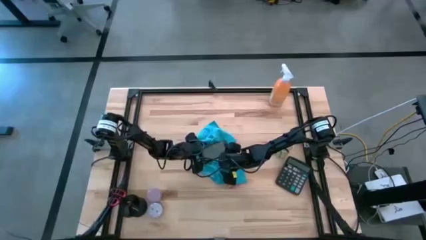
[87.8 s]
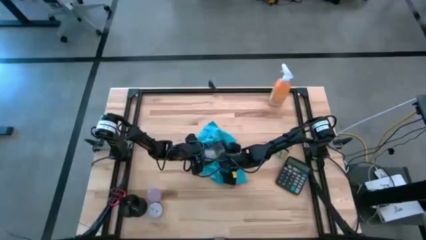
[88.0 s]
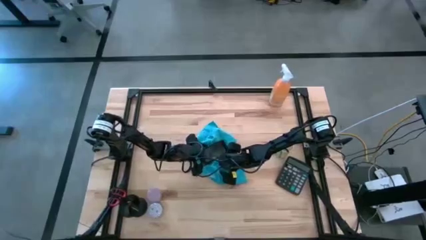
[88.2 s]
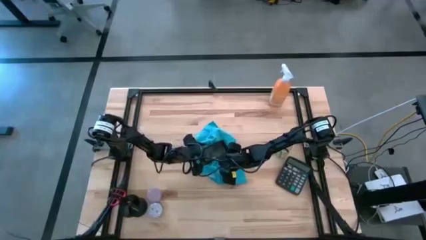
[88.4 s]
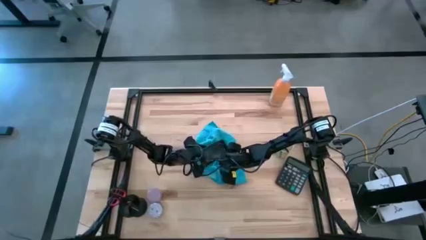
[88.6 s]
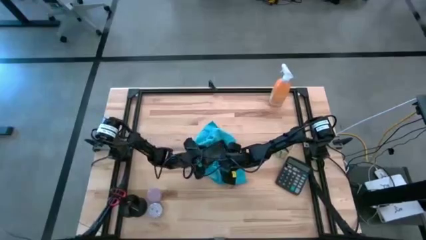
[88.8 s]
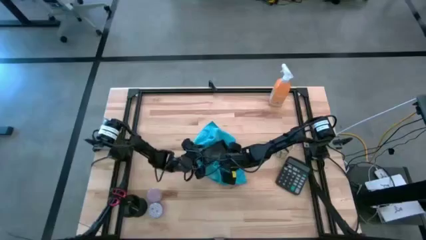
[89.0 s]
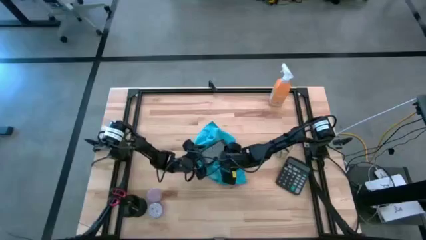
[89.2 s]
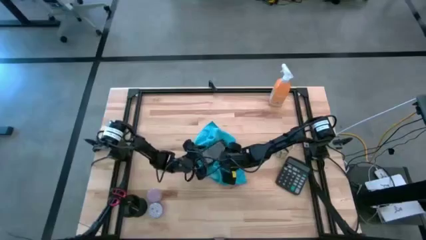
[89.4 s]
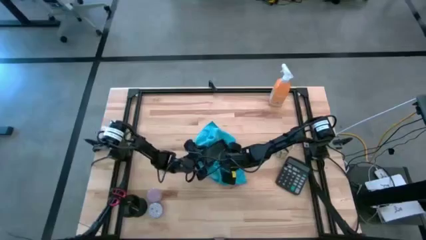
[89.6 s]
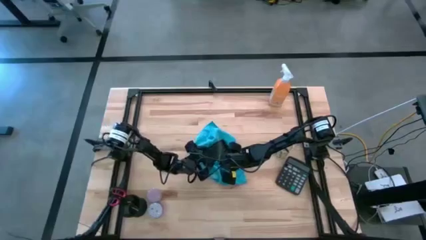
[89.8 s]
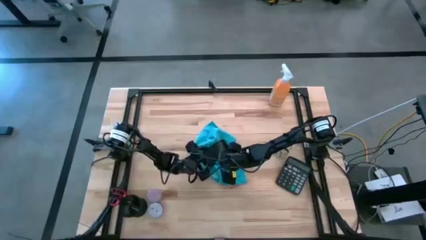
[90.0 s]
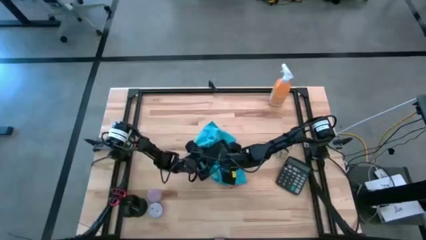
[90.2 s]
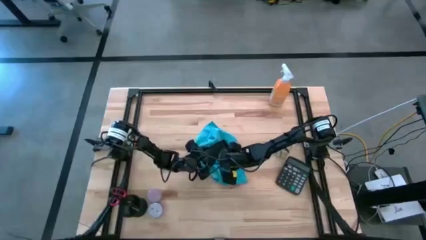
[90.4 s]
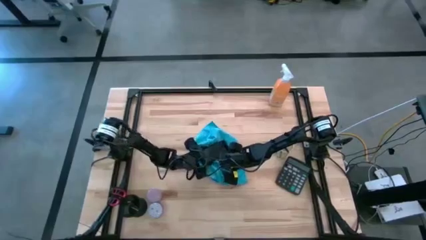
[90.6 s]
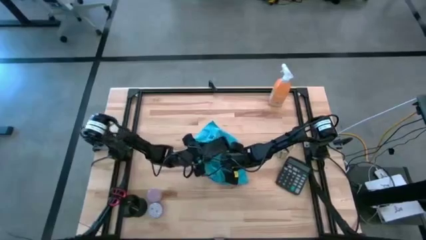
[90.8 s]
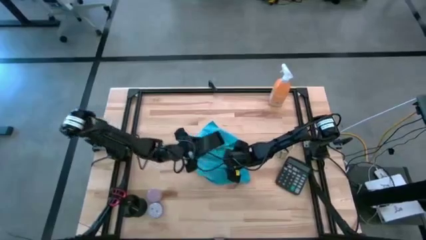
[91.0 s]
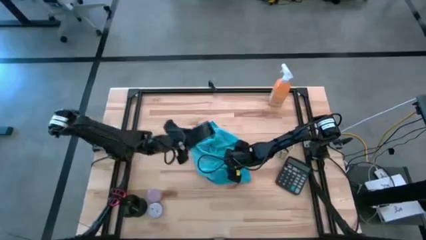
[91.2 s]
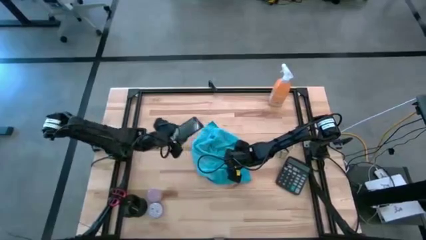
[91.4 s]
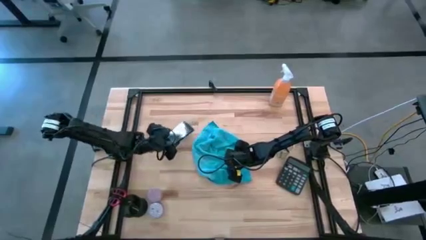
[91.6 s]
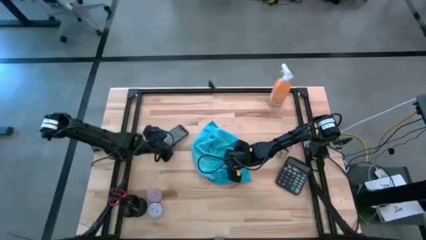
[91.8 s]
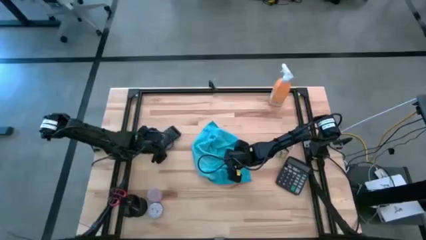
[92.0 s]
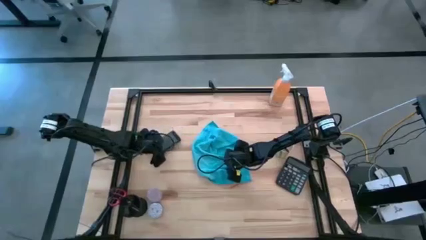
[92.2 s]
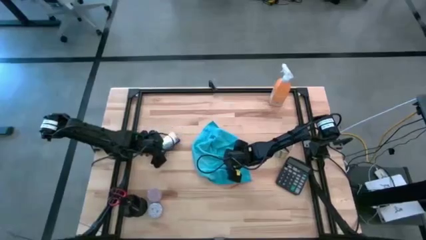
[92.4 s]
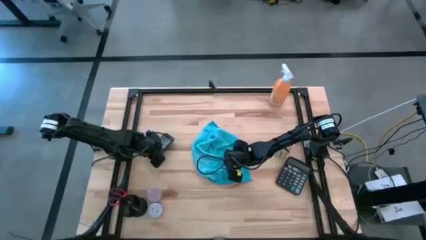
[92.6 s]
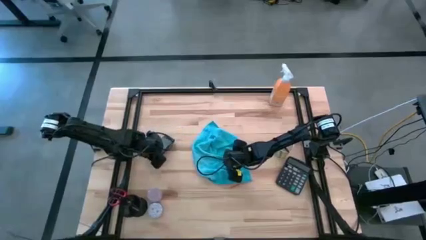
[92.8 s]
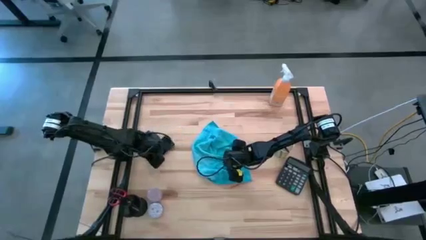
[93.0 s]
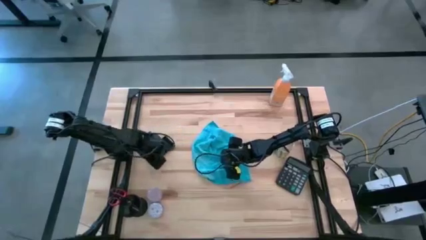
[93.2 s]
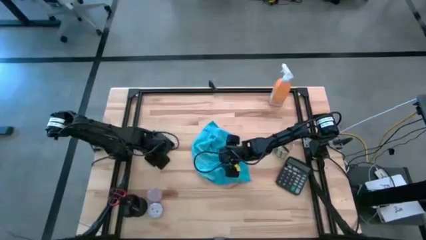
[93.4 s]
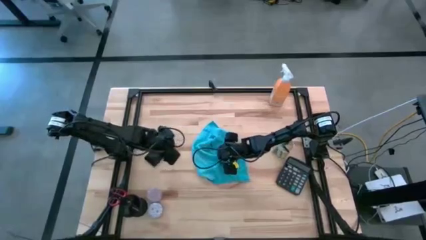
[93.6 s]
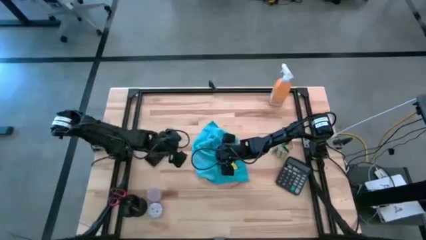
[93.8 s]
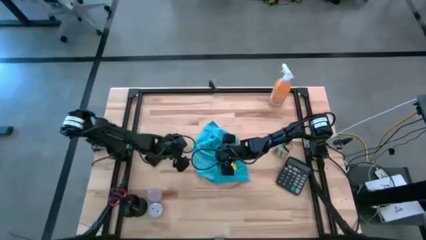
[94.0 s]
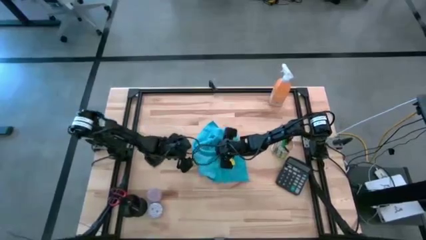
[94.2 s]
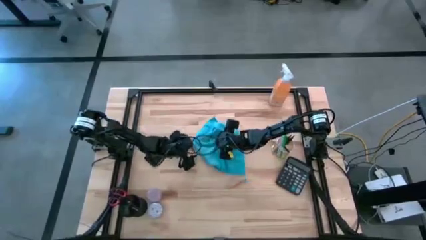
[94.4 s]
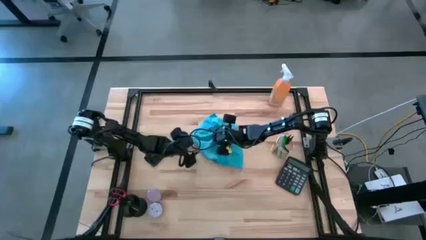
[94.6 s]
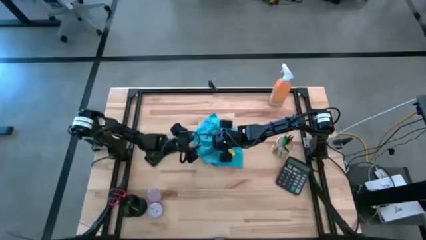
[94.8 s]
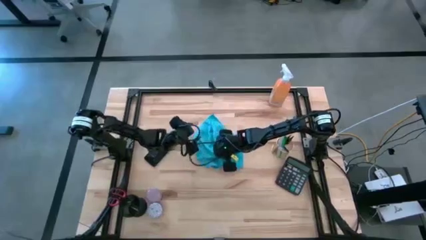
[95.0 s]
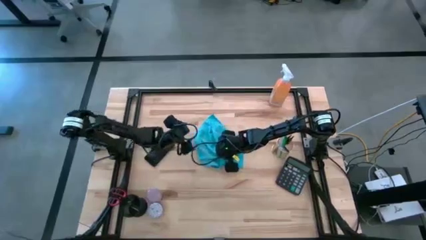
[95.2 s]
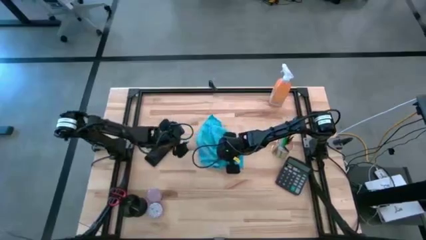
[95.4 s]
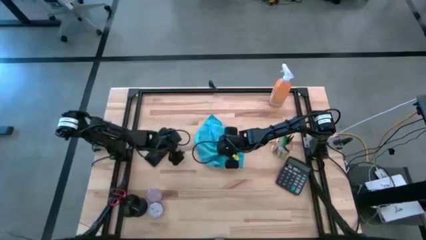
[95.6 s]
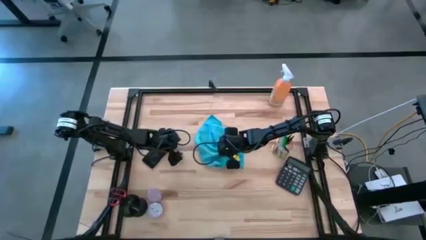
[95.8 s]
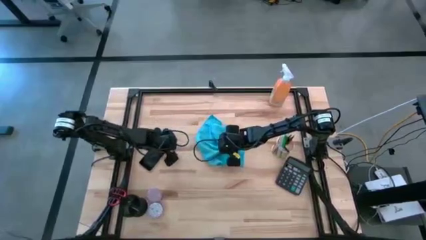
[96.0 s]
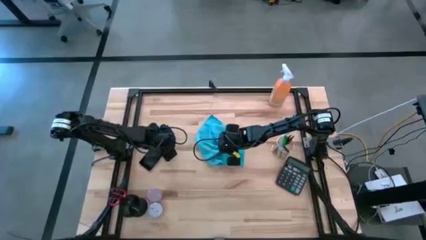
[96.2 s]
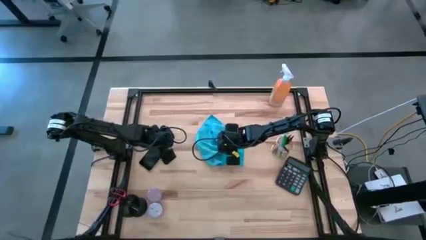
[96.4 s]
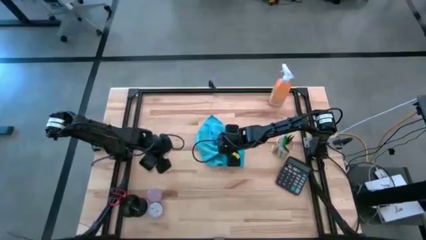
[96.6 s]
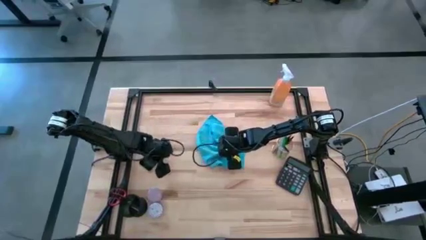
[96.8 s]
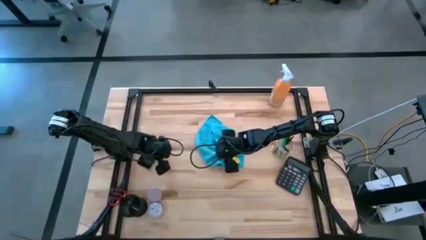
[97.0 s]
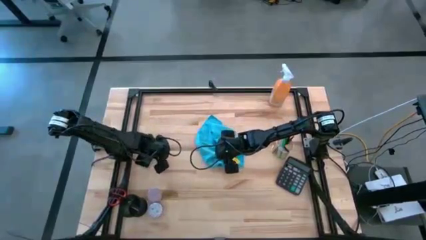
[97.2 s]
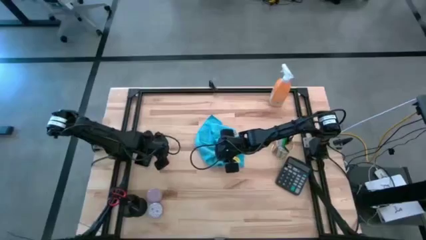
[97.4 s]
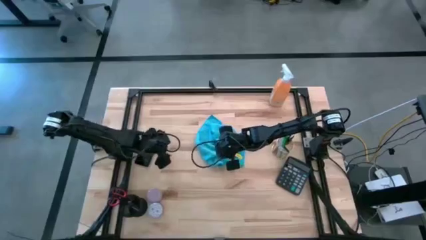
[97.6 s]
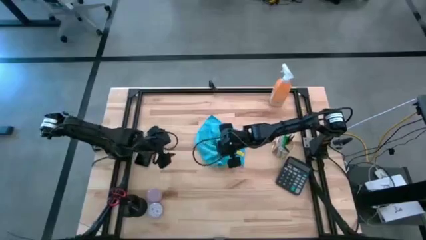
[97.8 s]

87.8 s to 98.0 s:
Task: Apply microfiber cloth
Wipe the front and back of the black cellphone using the blue microfiber cloth

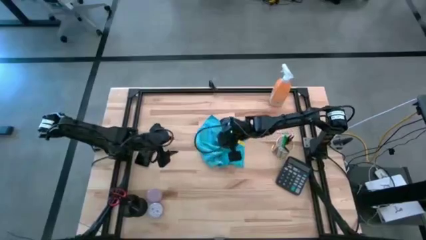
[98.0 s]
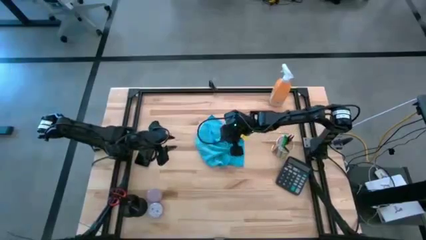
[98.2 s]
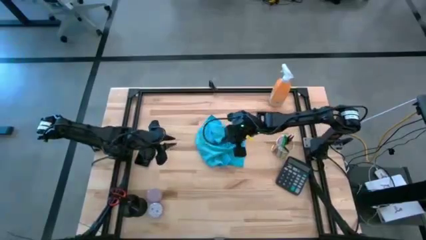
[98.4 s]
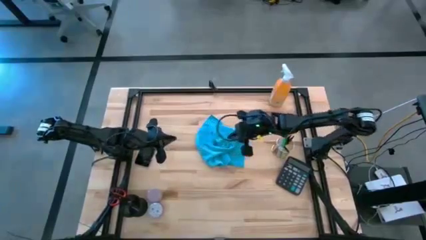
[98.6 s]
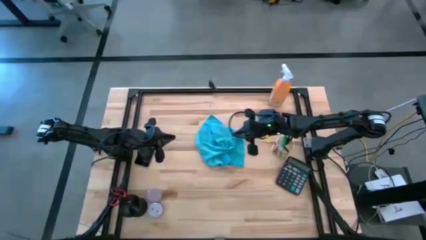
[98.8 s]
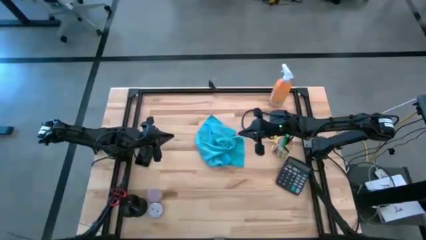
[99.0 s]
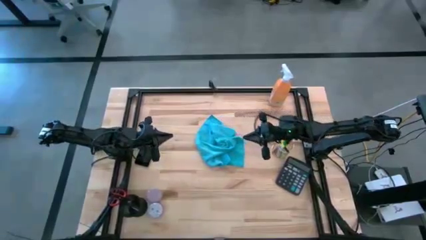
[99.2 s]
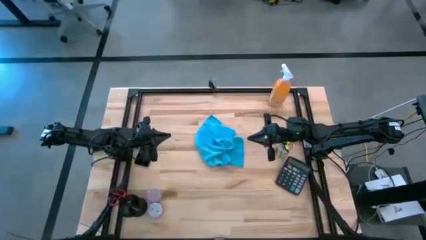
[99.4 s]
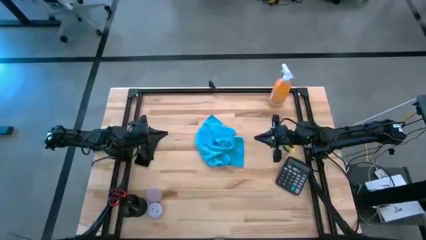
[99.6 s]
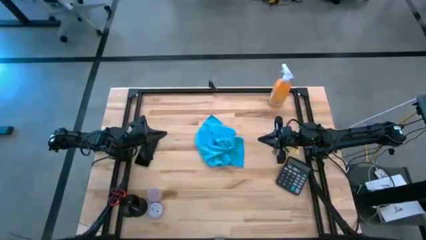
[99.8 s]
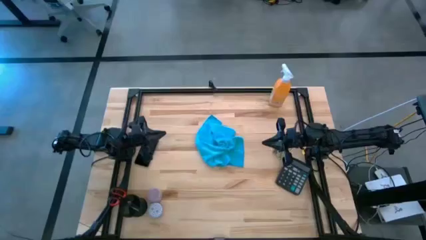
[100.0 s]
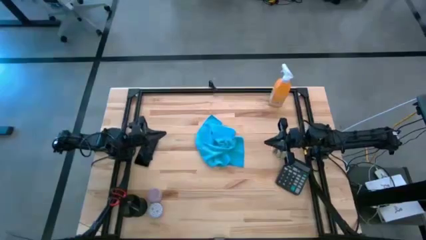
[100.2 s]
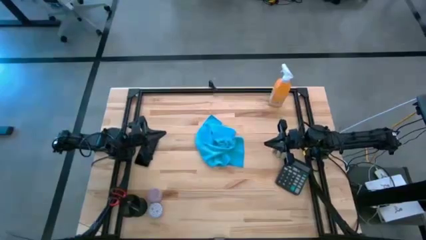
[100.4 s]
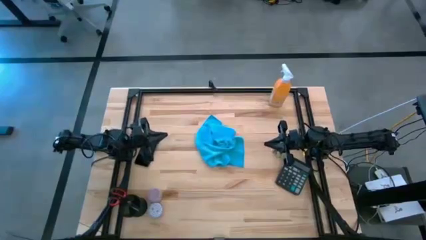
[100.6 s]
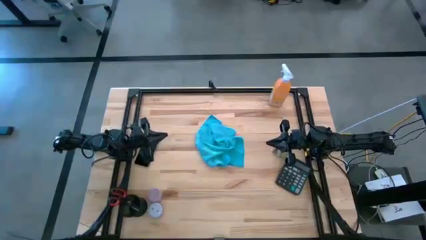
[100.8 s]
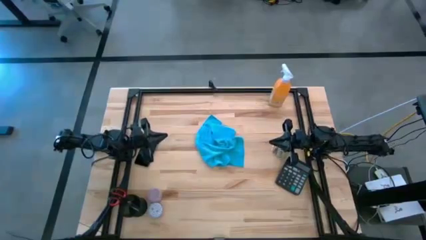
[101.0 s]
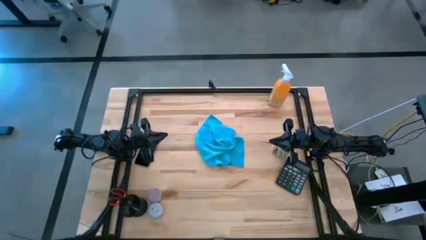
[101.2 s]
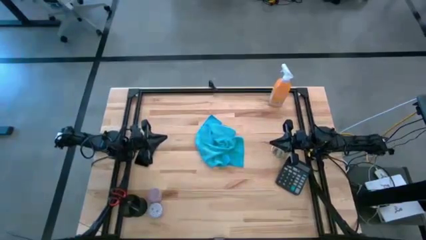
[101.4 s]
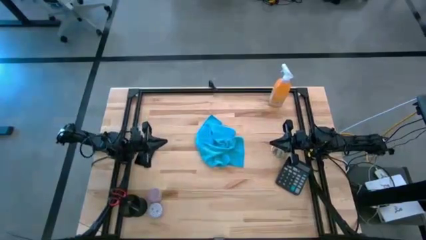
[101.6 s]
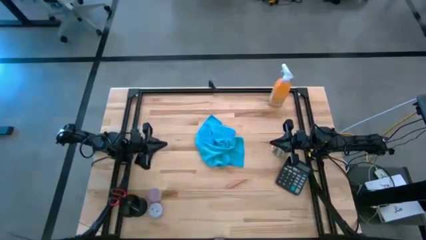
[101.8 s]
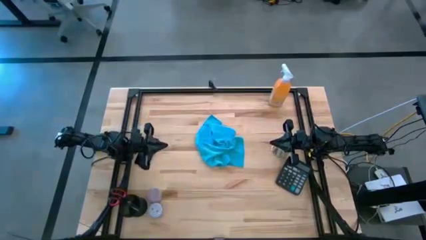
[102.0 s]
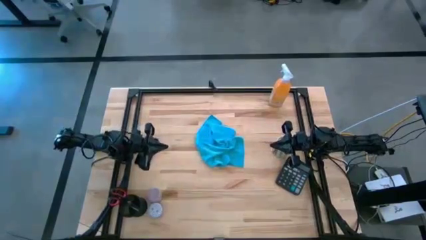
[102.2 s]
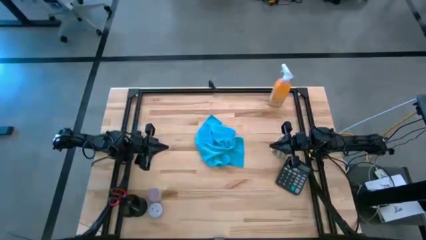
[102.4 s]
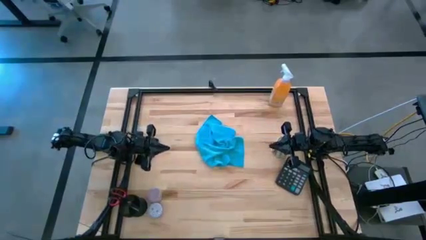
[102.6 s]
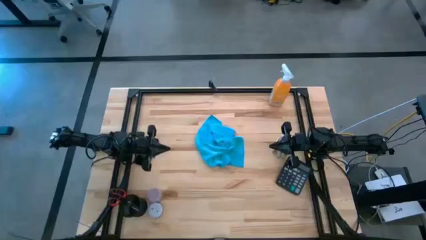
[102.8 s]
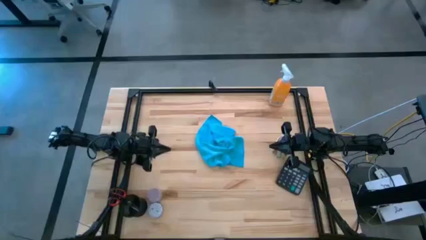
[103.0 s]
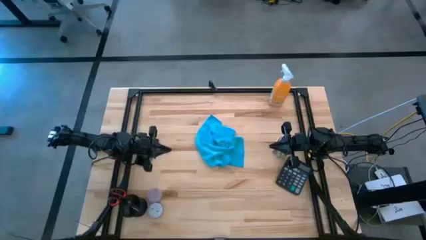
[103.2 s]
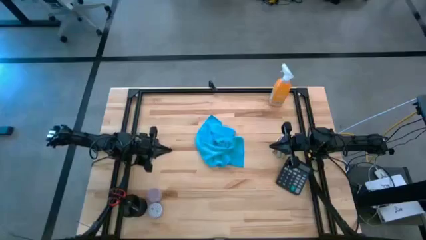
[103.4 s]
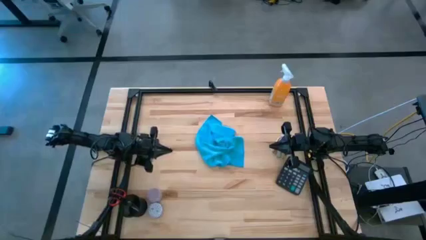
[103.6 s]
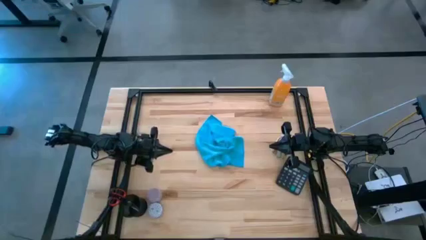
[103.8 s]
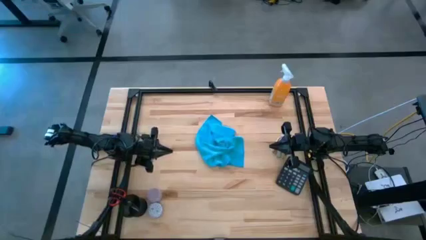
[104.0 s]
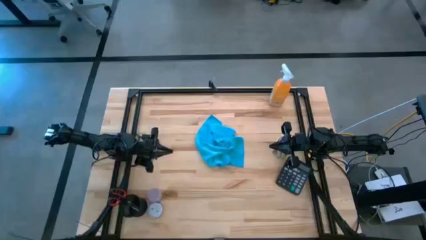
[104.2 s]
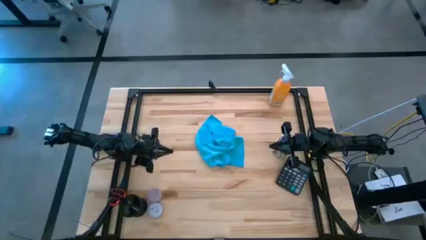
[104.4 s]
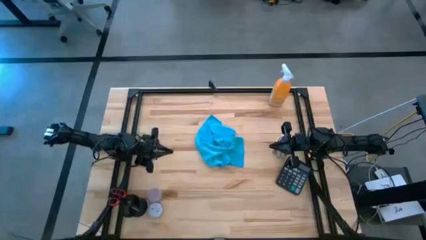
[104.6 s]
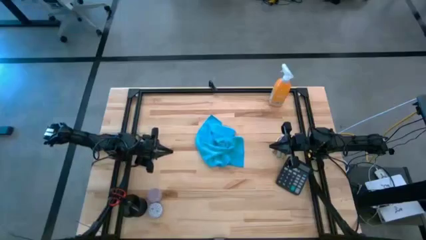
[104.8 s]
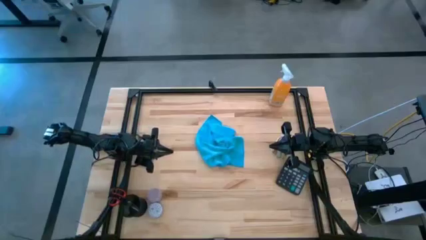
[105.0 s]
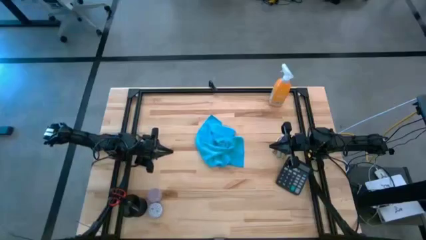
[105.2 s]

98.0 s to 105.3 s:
Return to Home Position
